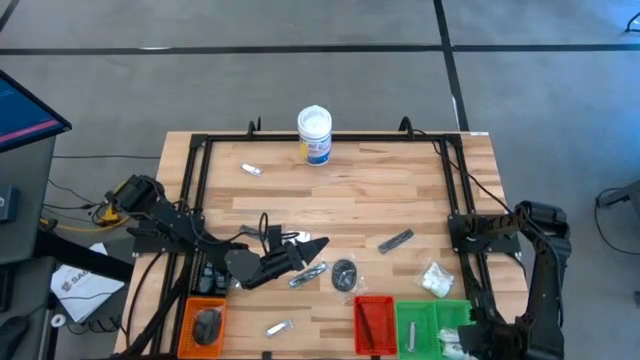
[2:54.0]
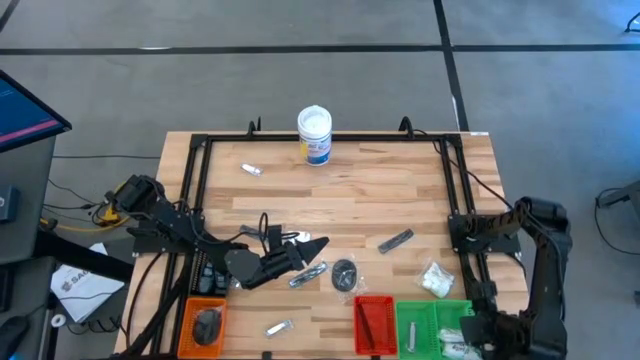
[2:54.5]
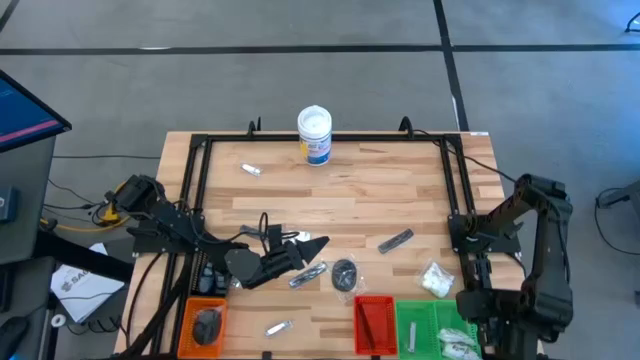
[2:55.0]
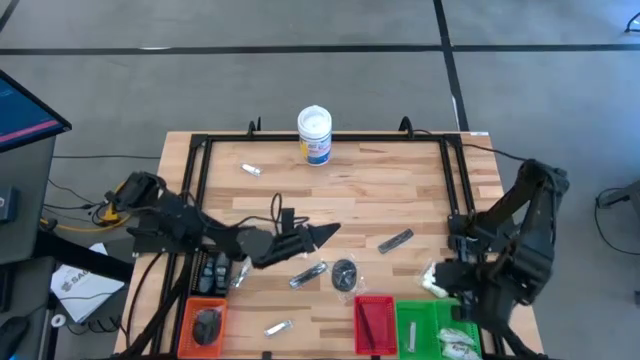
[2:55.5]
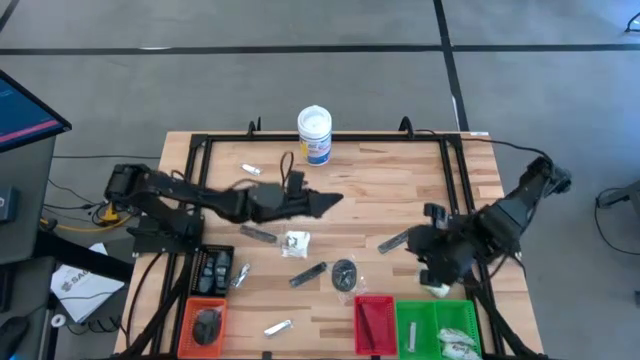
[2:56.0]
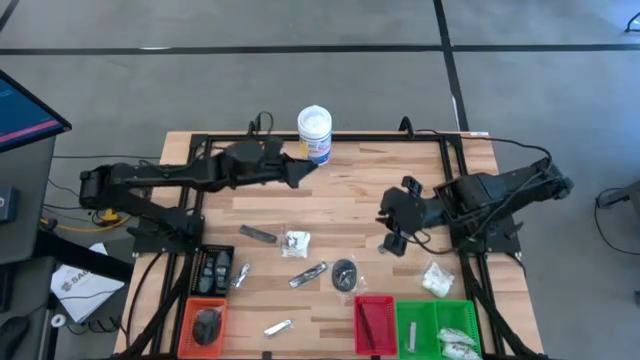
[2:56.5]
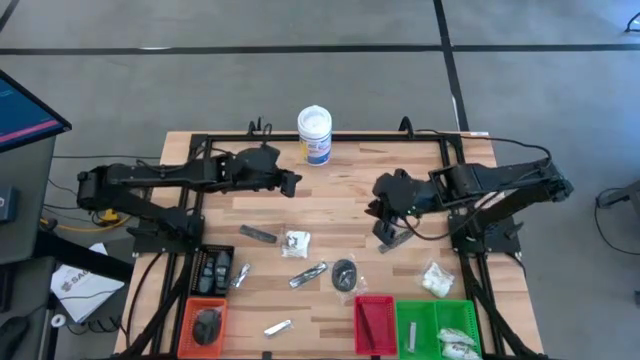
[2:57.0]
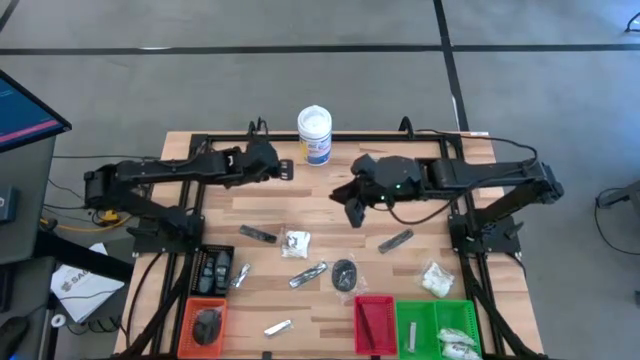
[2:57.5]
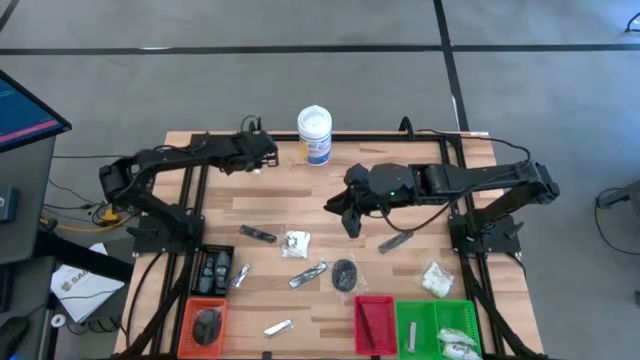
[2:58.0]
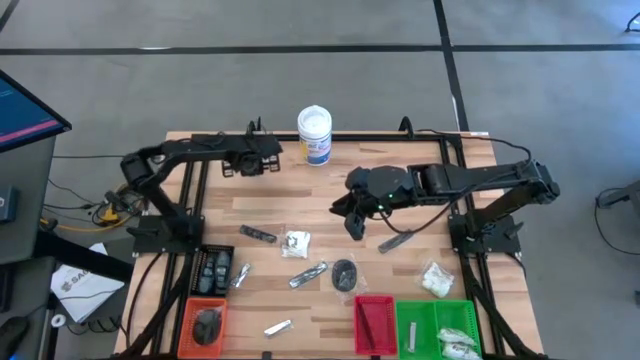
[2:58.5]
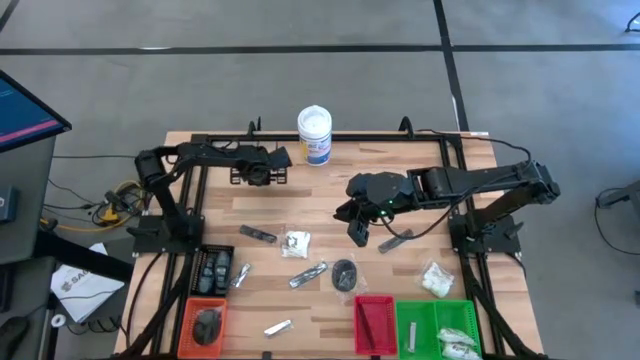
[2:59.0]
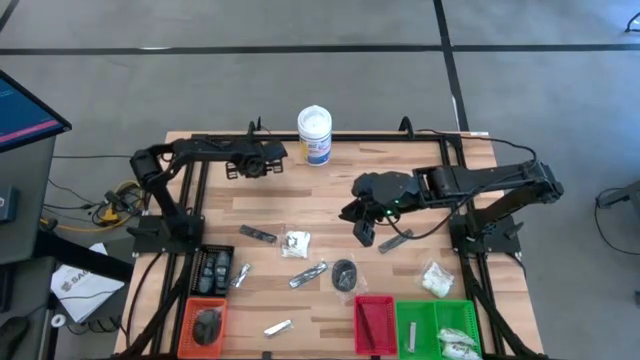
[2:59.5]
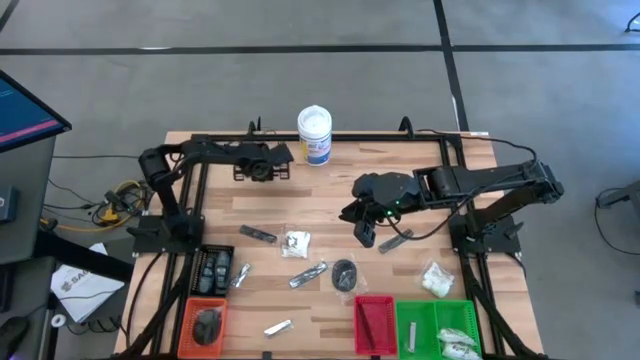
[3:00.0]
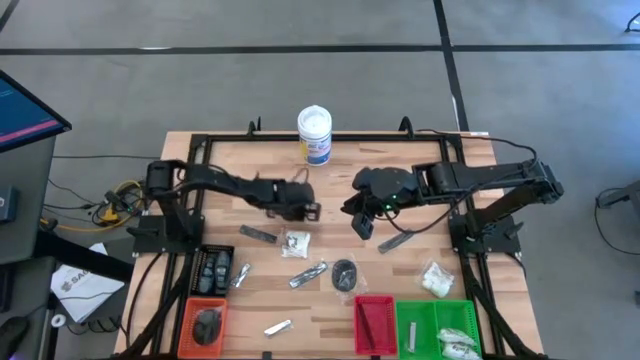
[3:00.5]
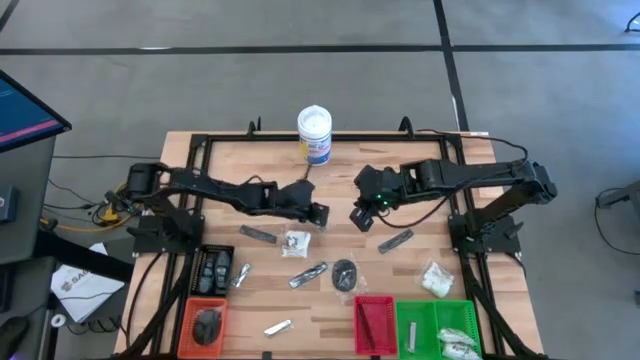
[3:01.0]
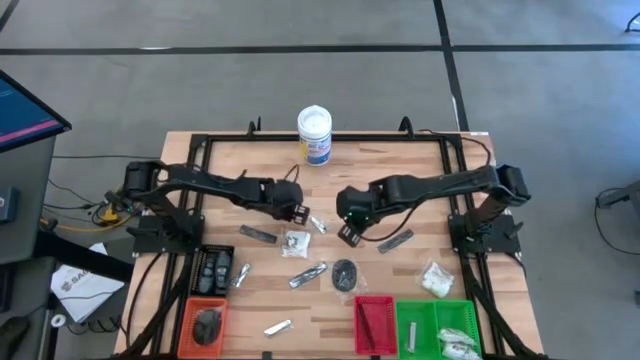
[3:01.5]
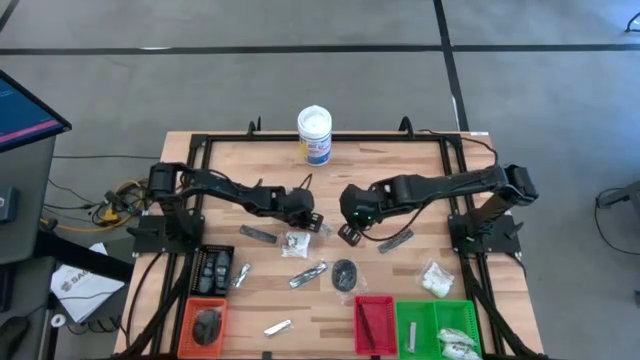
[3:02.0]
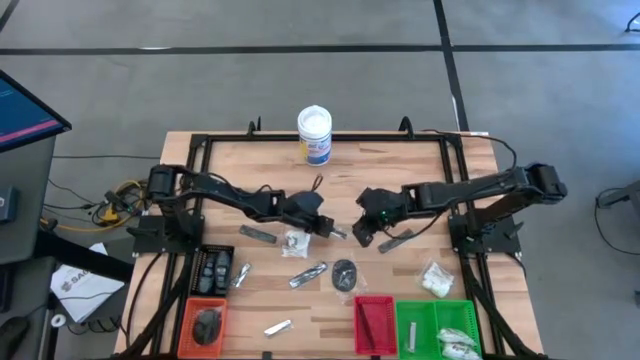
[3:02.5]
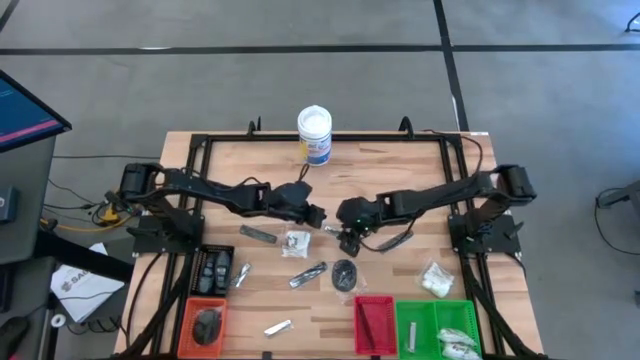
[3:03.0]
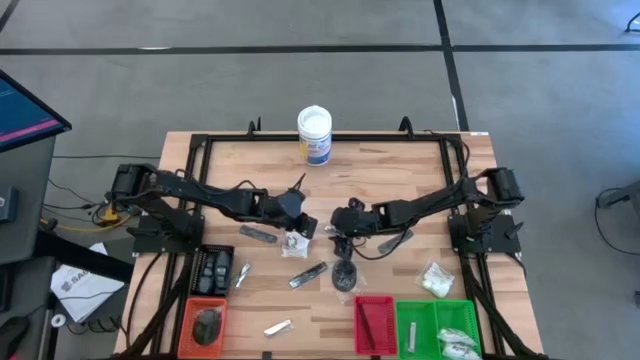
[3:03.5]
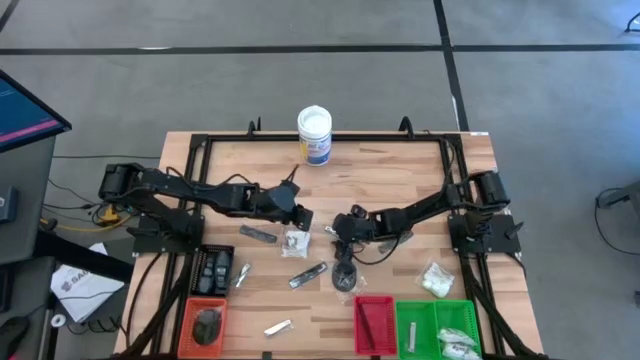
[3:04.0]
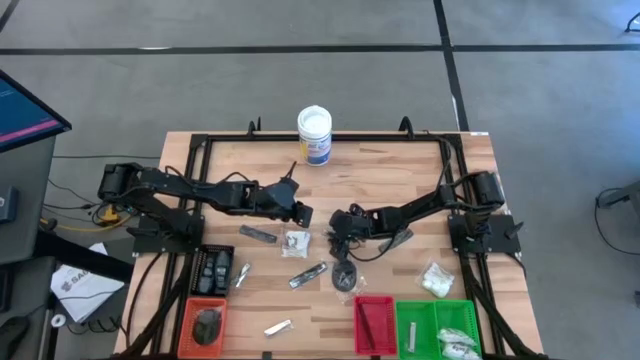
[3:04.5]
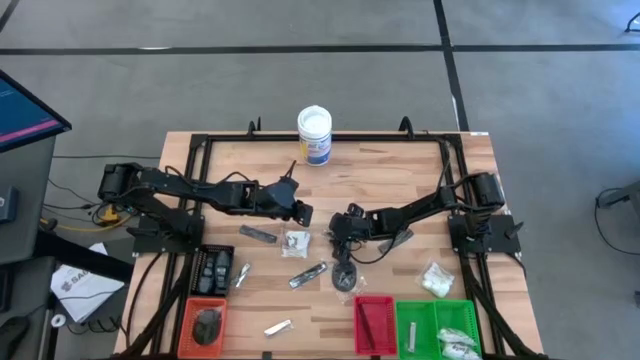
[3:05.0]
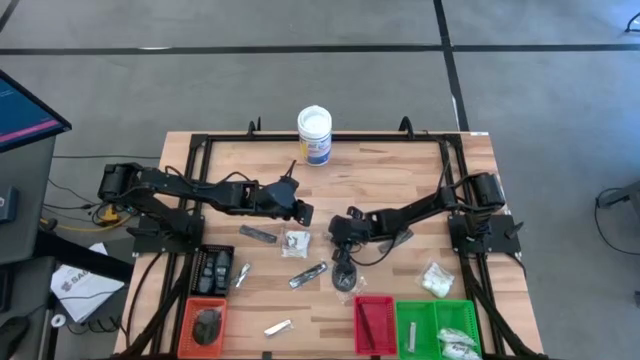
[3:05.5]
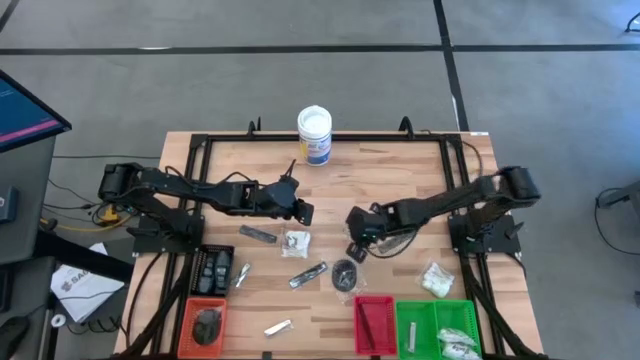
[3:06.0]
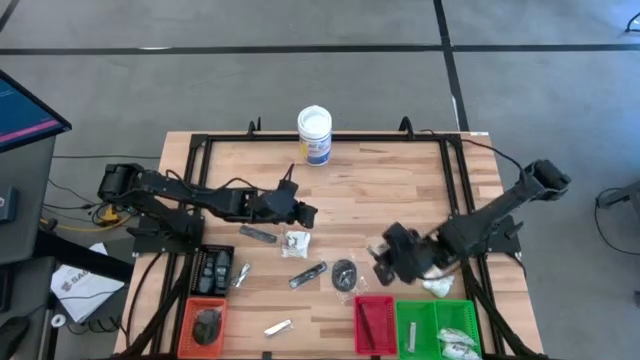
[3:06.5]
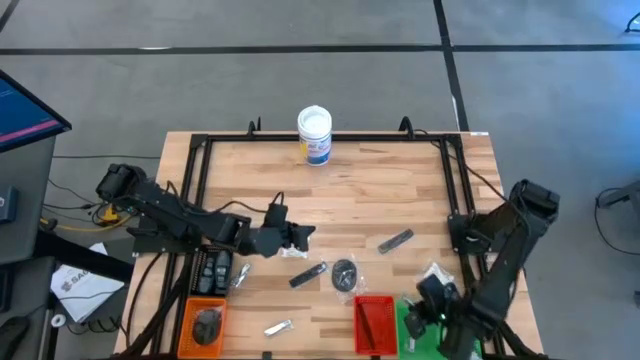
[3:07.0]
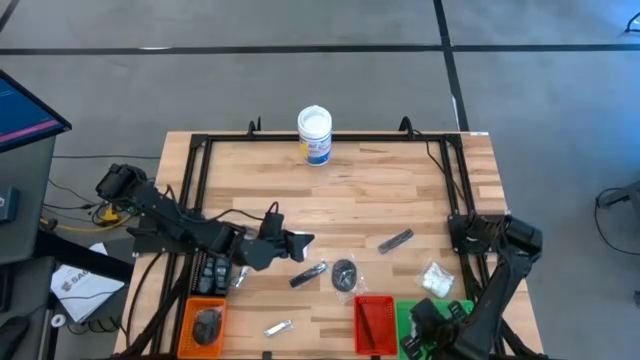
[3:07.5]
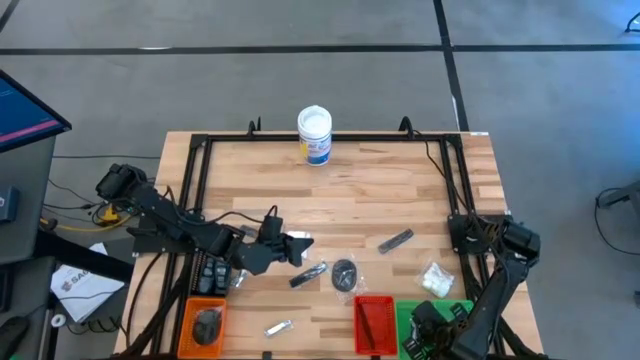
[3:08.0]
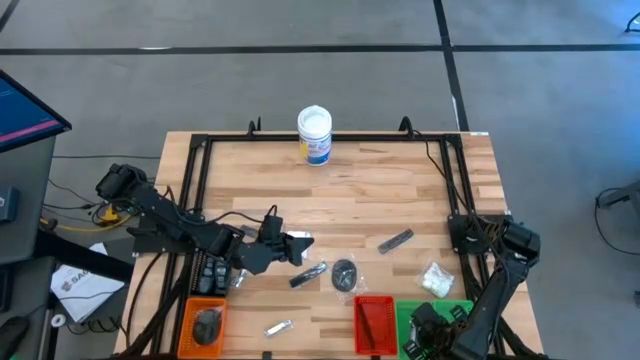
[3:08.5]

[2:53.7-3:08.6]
Task: Pick & Place Travel size toiletries
Put the silver nail cutter into the left green bin

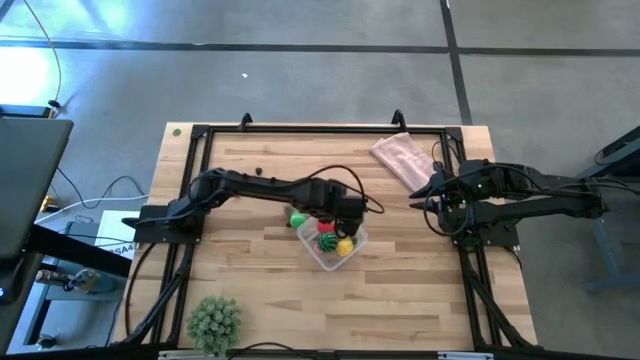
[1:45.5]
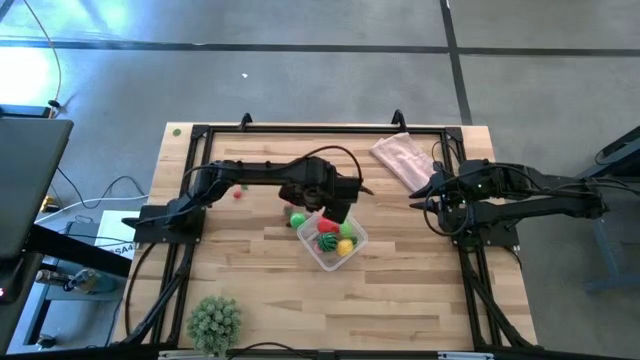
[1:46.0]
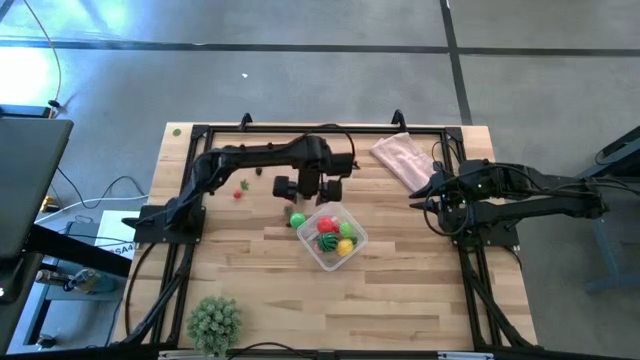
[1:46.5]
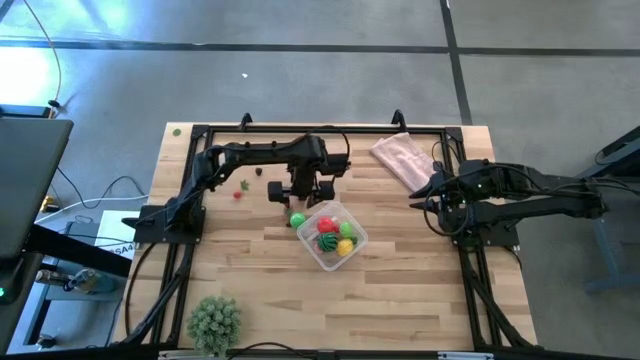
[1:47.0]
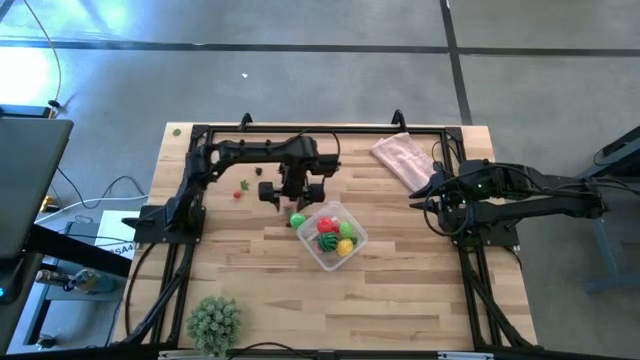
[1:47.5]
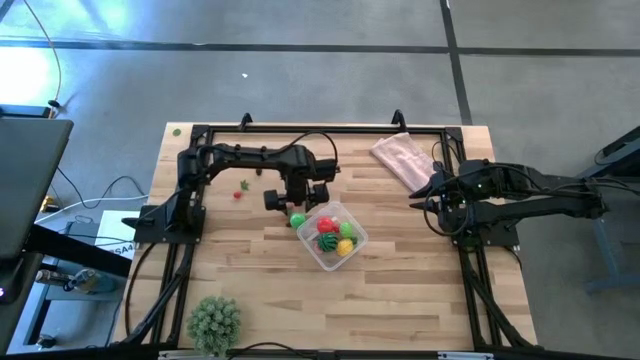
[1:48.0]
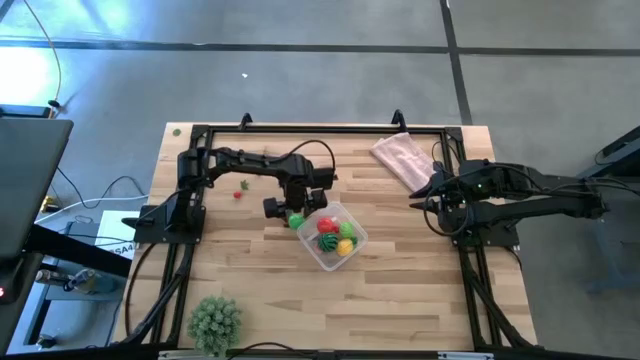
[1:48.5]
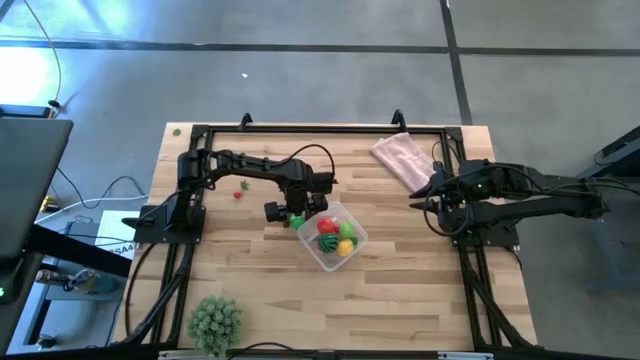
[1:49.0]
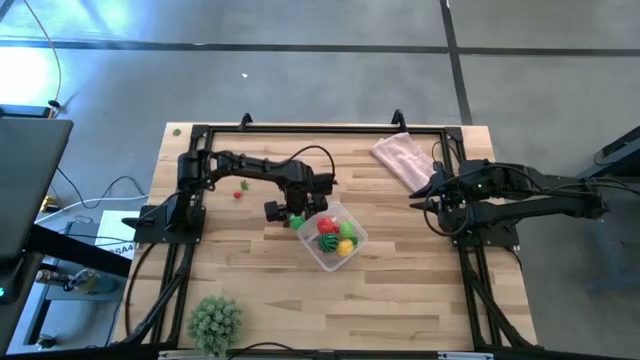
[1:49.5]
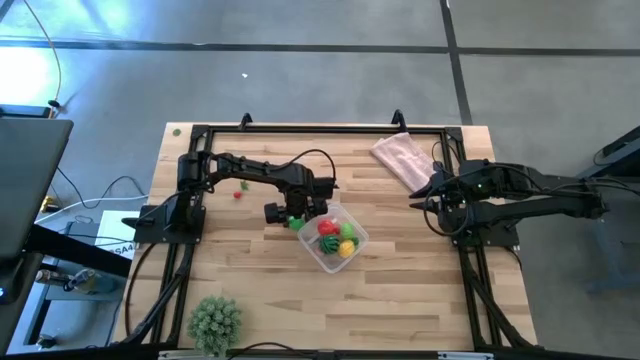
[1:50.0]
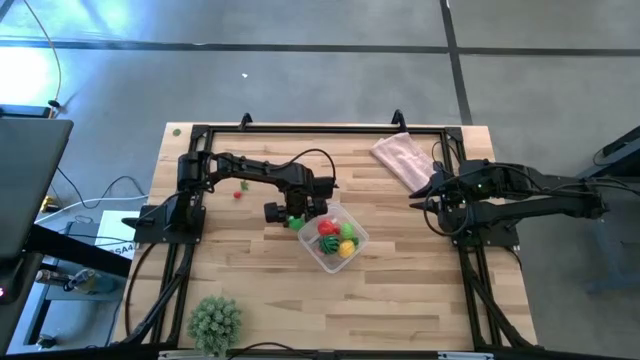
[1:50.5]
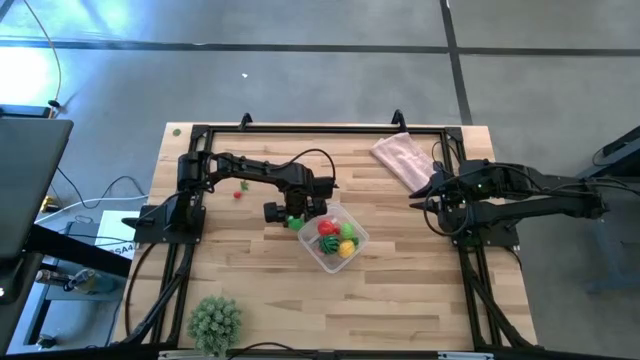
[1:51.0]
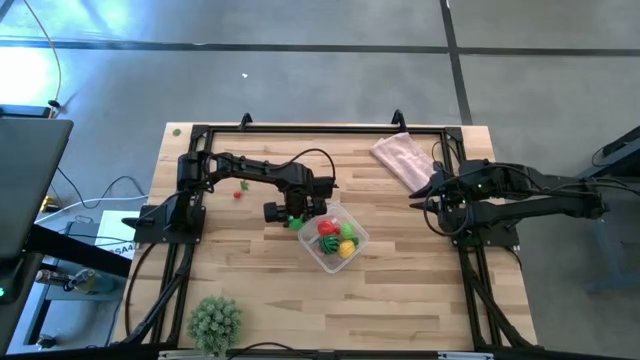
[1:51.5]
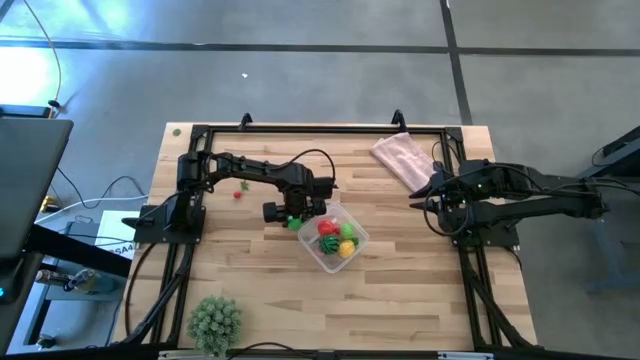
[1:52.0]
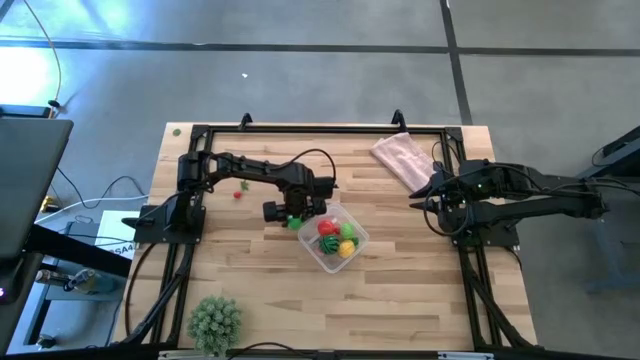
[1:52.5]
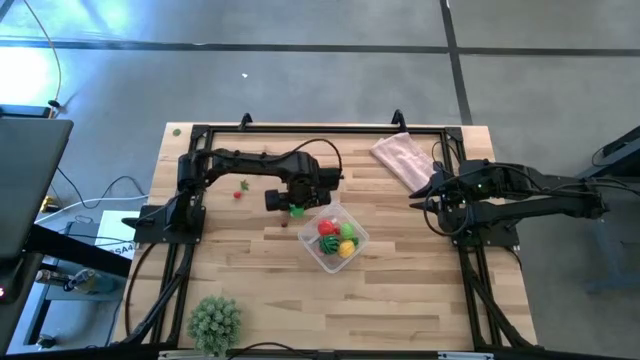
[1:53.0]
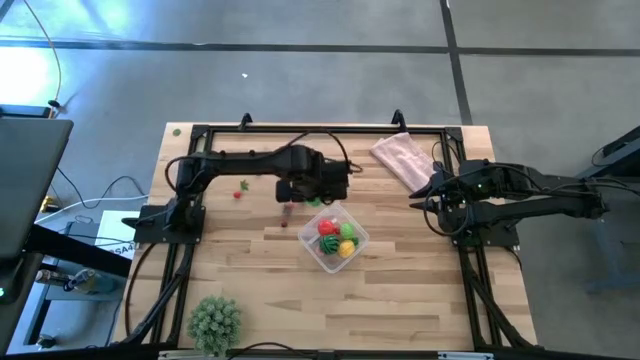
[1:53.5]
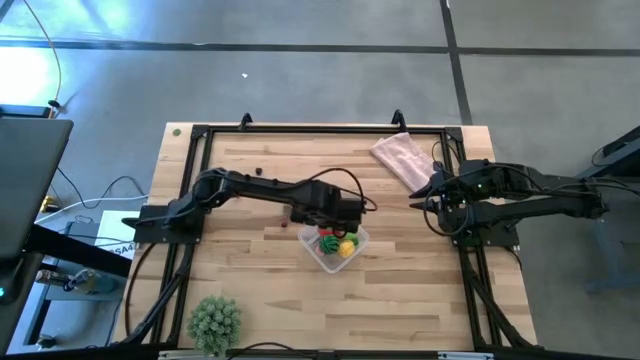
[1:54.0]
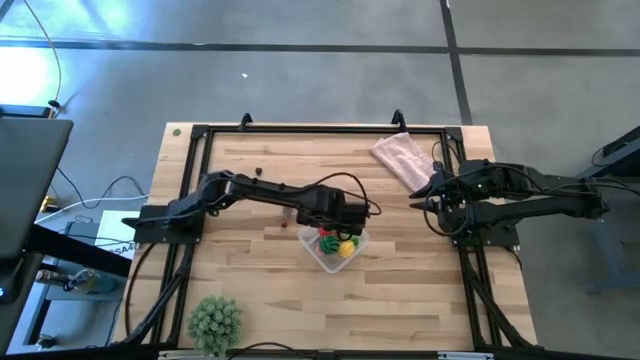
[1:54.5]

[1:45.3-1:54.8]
Task: Pick and placing Produce into tupperware
Put the green pear into the transparent container
